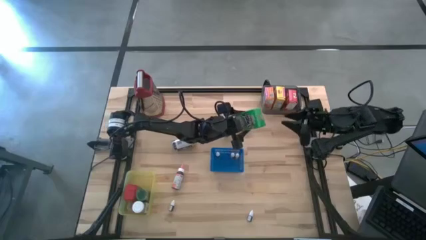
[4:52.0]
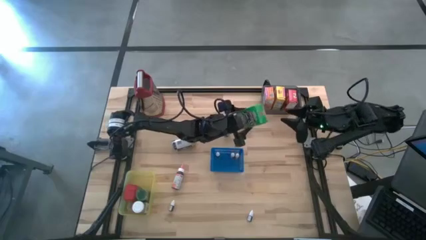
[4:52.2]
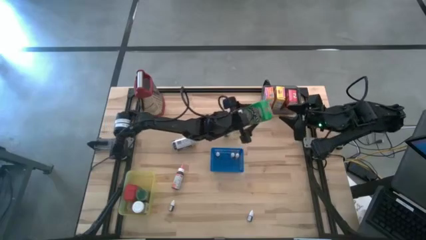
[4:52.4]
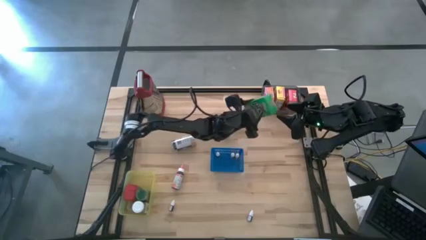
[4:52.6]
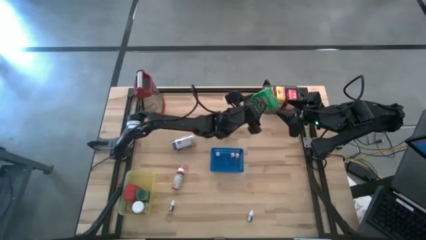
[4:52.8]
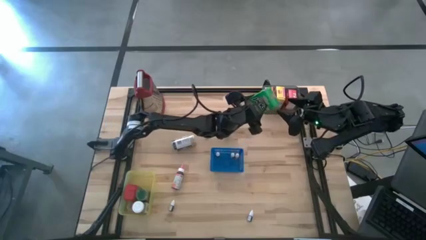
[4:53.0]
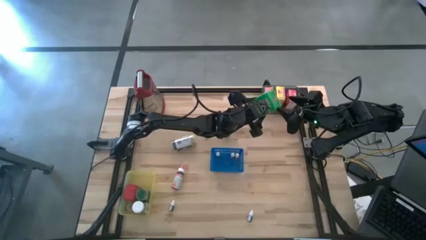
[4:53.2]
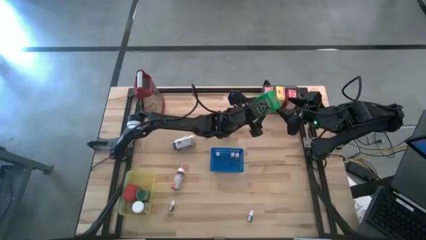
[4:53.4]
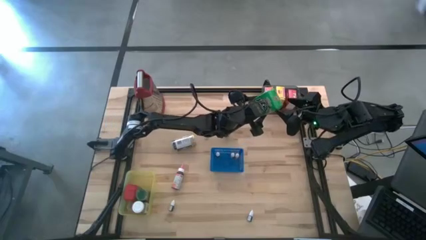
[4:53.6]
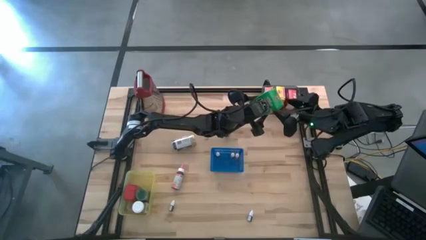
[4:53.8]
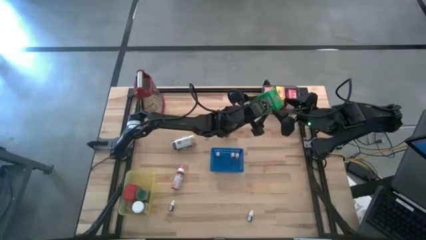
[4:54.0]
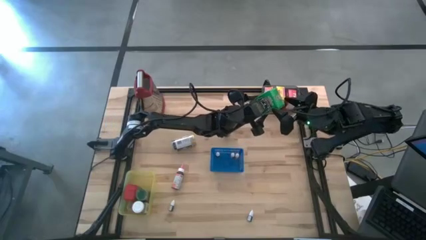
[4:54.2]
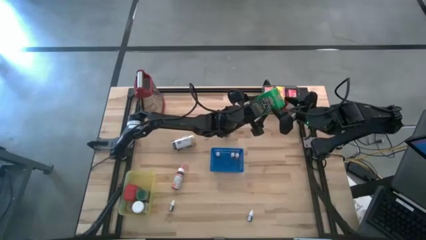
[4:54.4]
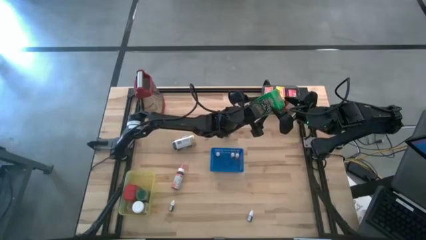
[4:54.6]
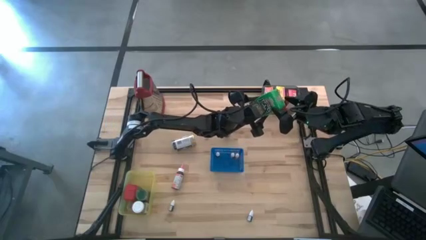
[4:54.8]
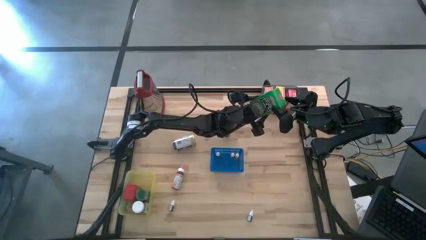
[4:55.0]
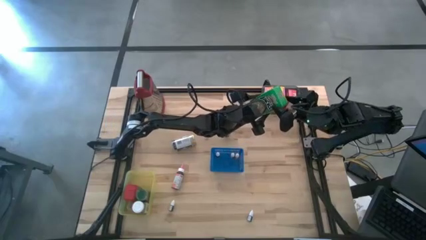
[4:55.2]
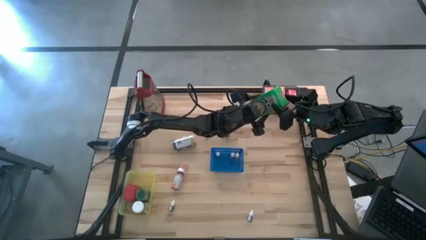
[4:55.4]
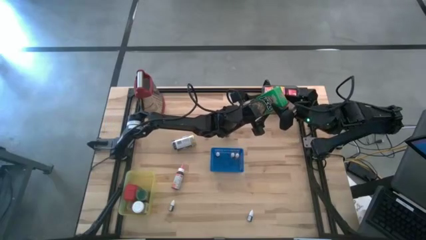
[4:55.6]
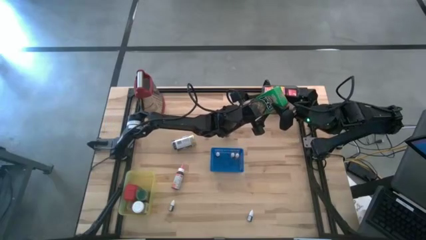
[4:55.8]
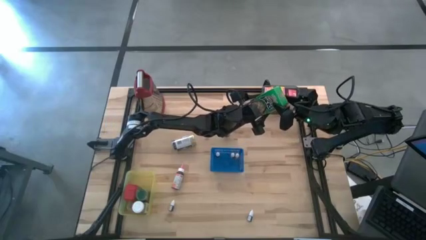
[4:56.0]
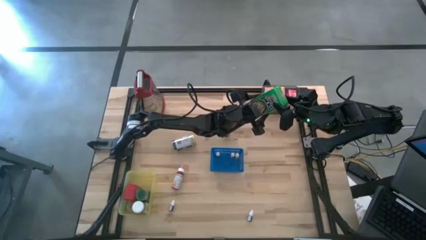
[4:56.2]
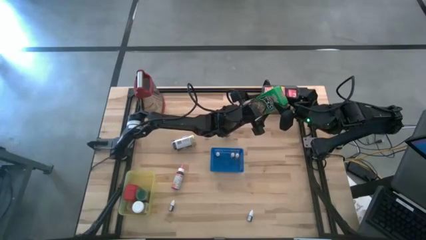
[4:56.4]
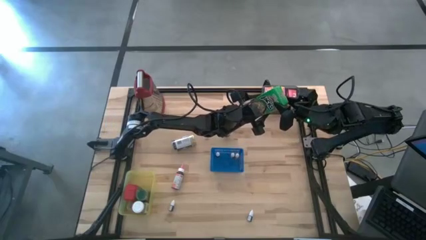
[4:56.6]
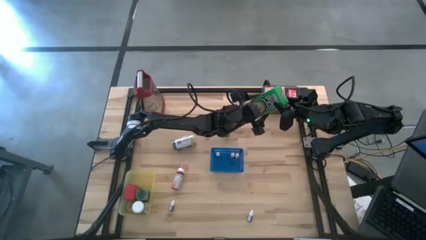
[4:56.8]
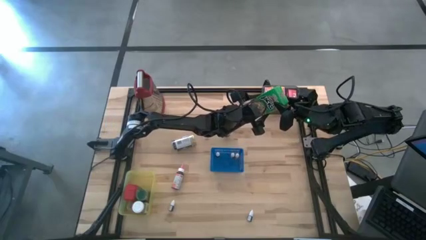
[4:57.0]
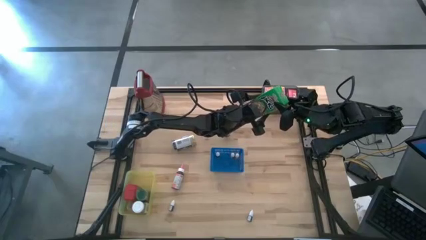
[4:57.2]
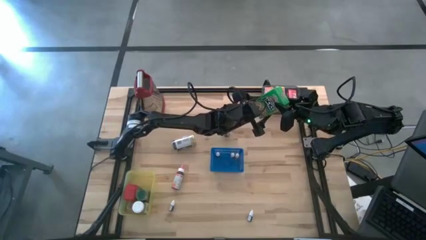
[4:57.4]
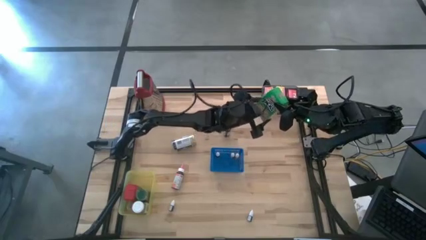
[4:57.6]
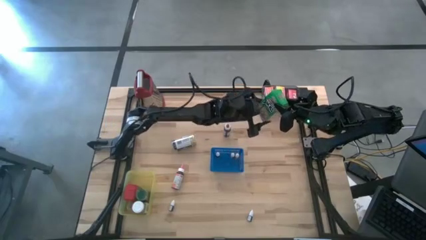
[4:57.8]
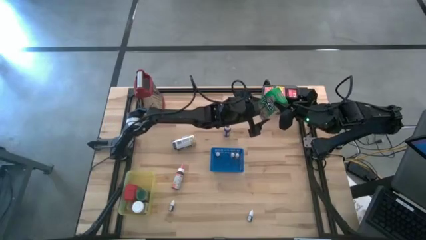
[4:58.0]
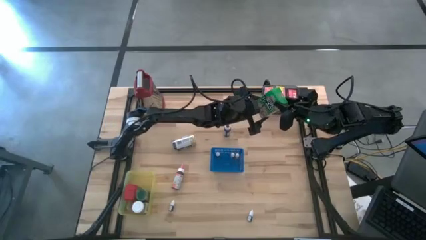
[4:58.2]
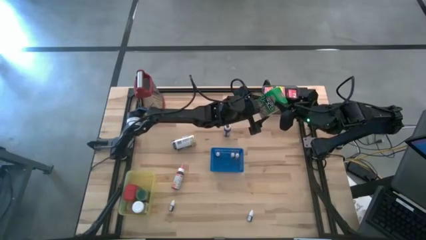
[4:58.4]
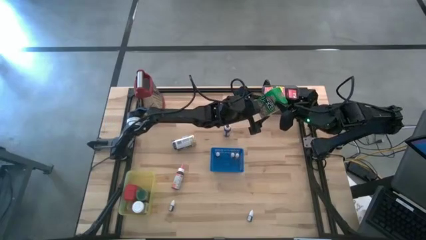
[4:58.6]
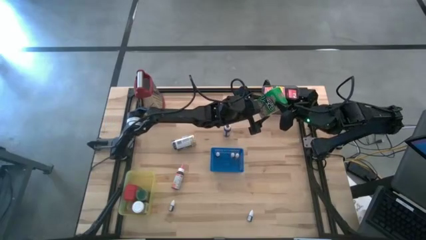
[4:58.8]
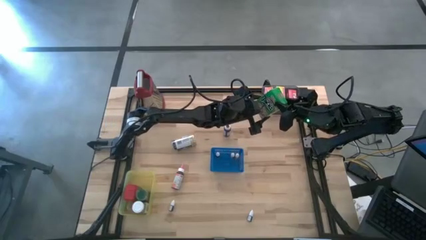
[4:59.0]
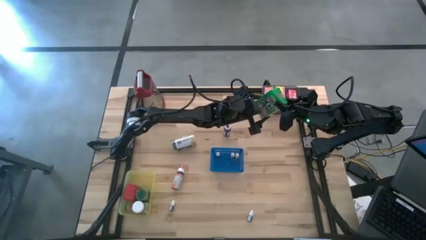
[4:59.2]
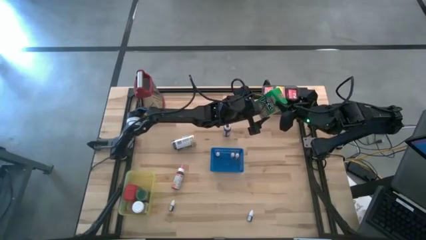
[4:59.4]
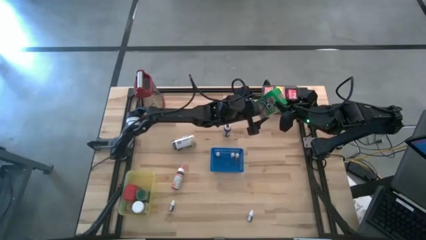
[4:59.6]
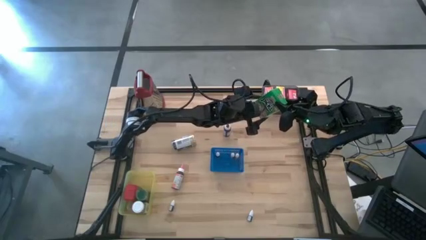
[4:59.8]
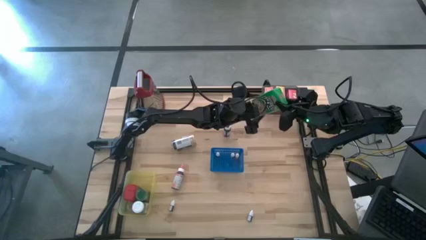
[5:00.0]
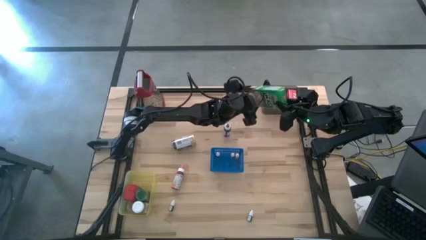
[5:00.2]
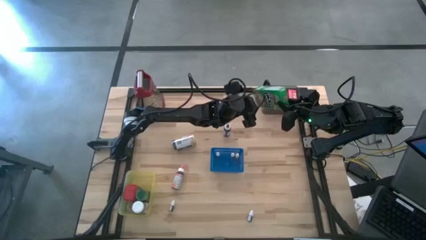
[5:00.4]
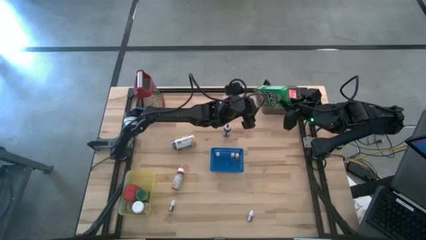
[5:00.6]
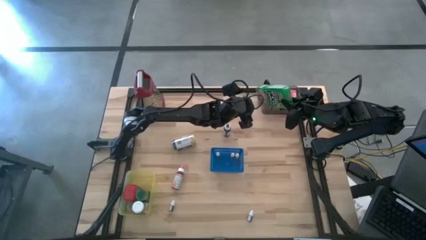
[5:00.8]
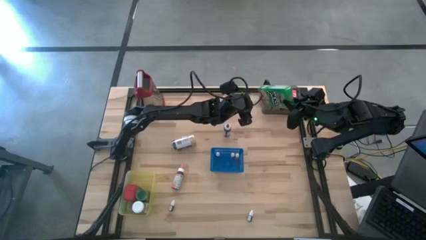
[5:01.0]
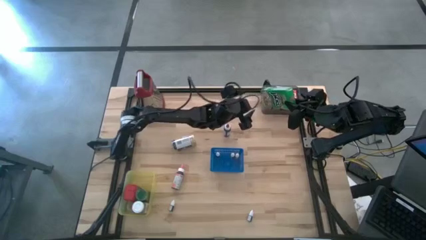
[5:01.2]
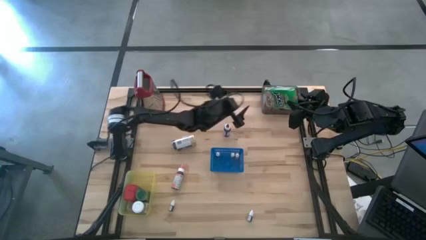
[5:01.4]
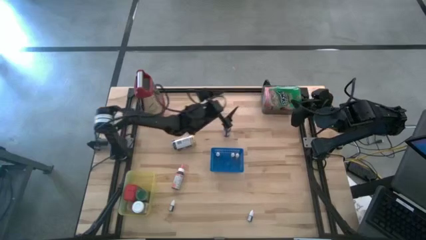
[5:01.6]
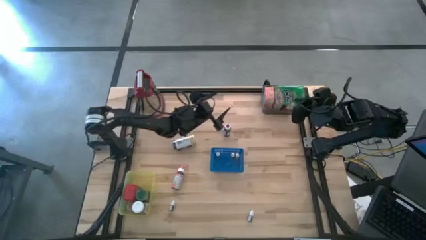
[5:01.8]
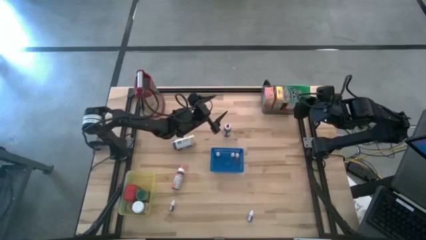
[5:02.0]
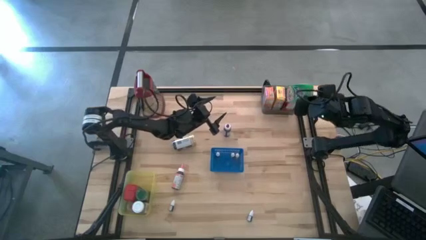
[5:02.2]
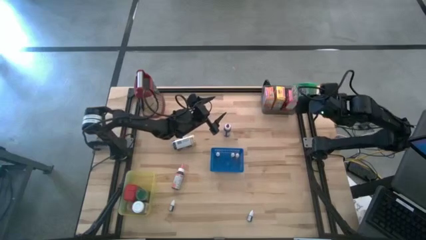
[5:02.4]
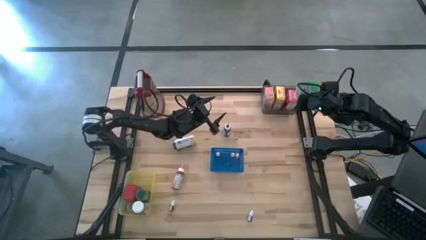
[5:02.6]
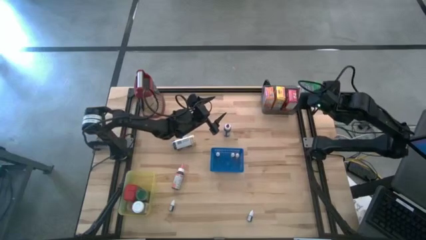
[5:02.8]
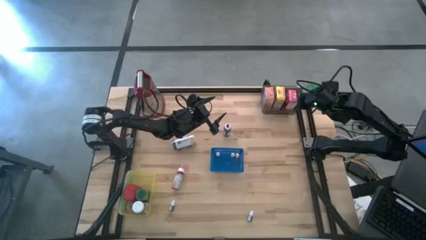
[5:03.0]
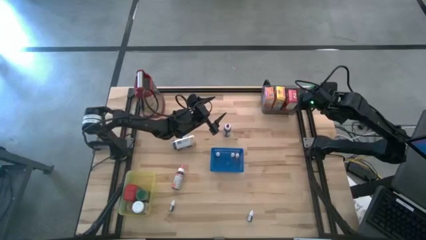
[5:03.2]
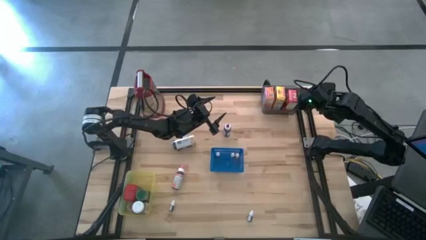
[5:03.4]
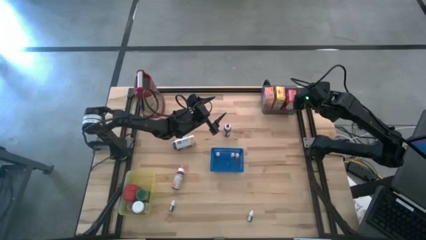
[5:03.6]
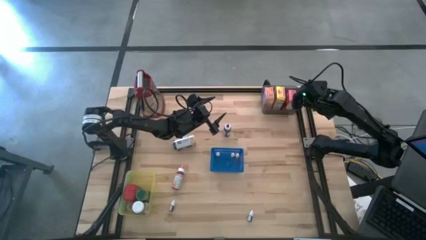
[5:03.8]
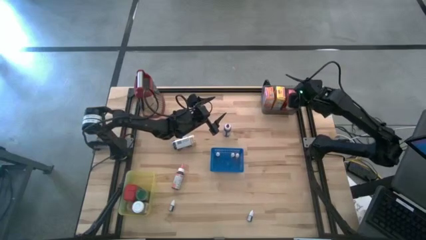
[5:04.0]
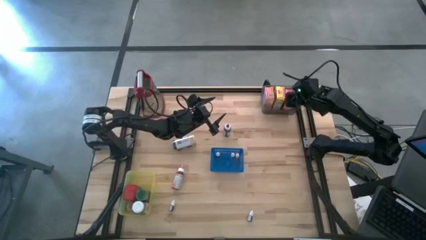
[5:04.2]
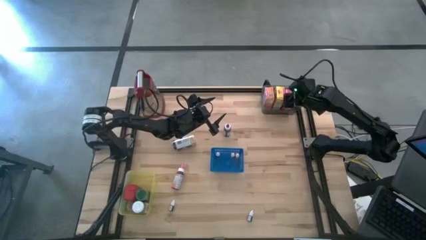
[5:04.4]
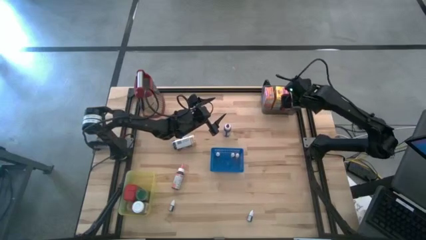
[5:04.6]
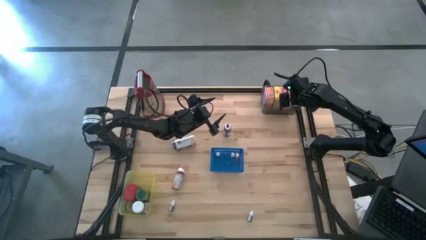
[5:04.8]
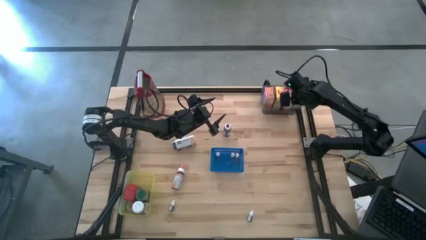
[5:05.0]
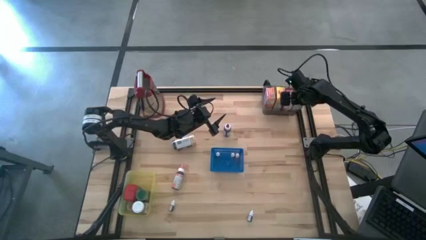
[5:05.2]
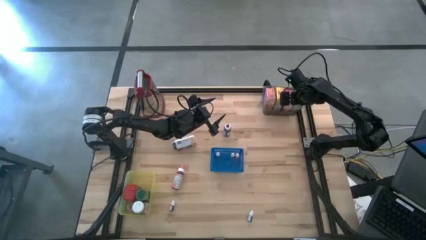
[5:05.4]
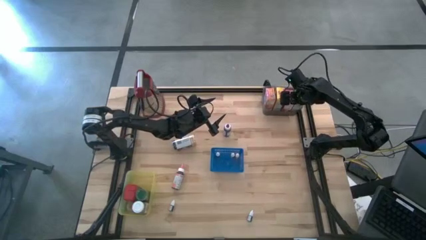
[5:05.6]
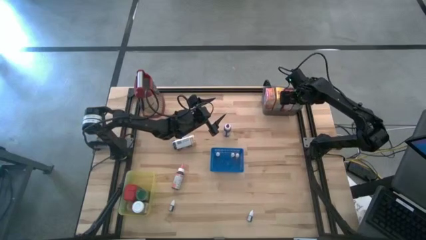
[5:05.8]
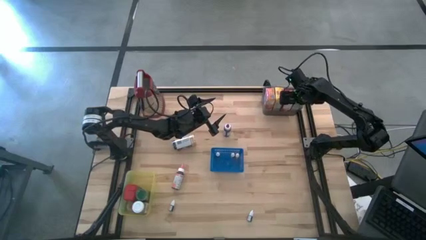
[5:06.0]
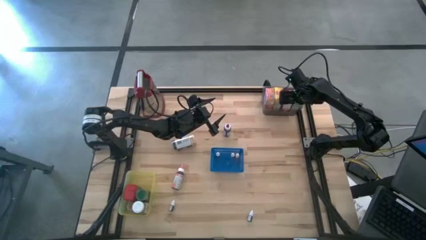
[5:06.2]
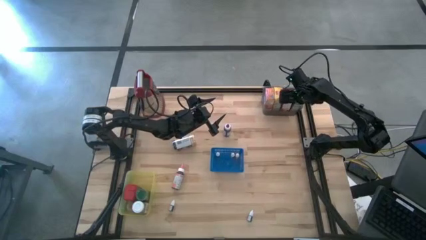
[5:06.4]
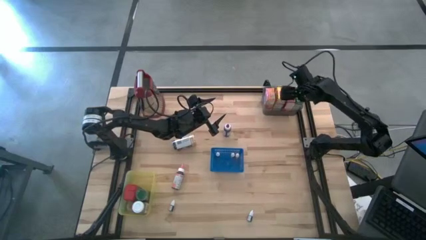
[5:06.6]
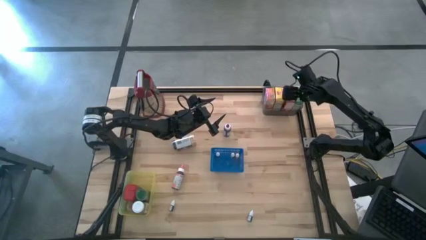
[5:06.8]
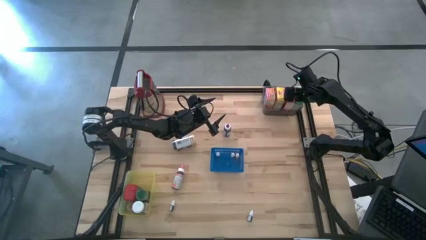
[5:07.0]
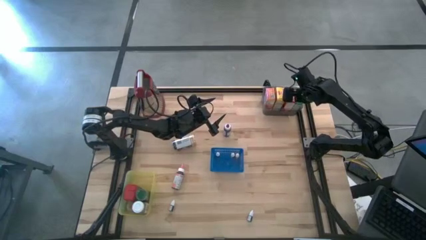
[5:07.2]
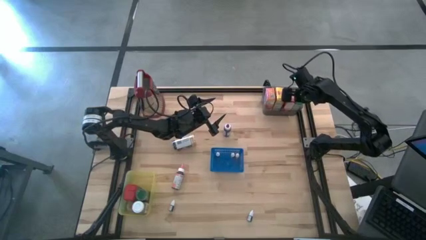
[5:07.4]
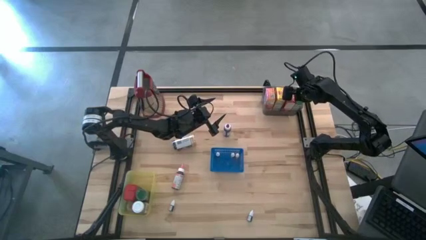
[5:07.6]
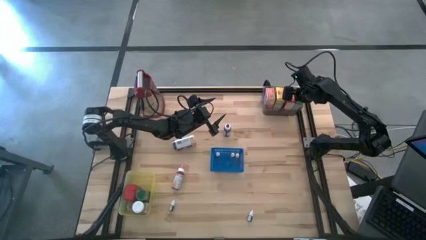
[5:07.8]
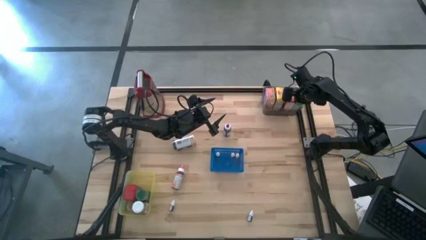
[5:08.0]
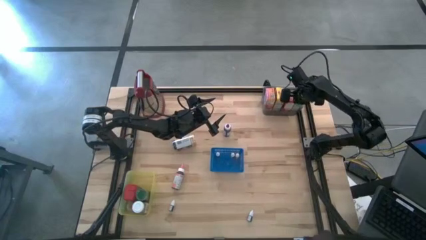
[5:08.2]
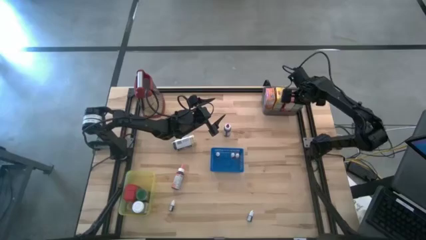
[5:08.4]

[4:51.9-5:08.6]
Task: Pick & Place Kitchen Items
Put the green cereal box into the black bin
